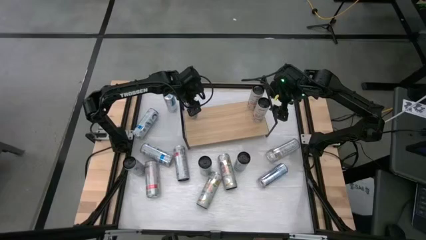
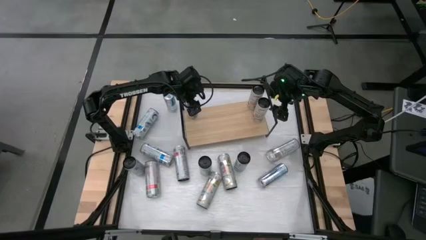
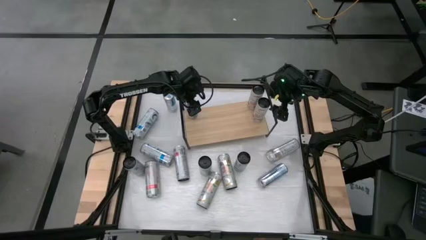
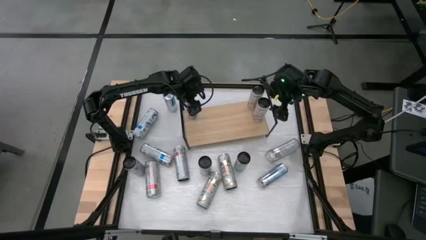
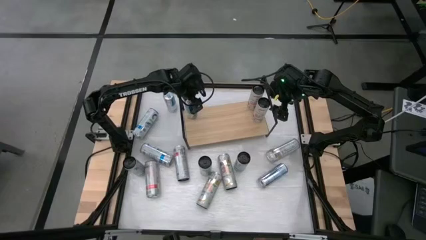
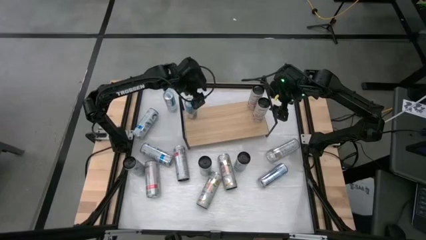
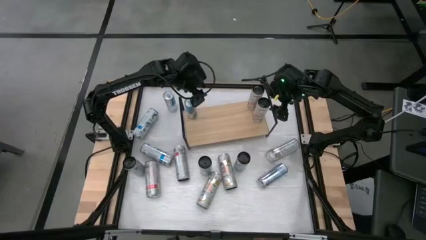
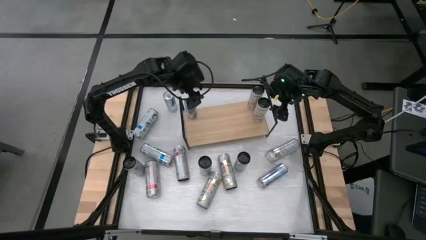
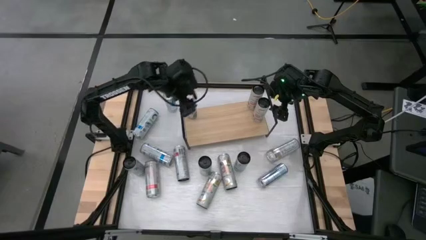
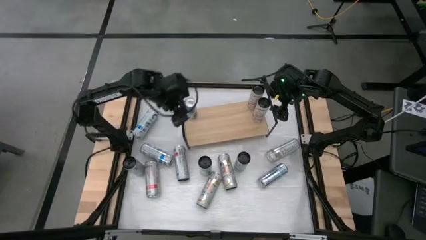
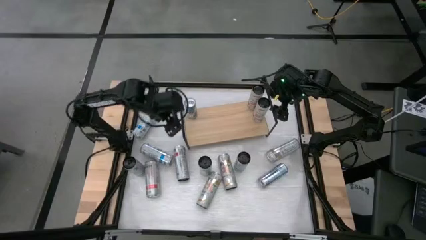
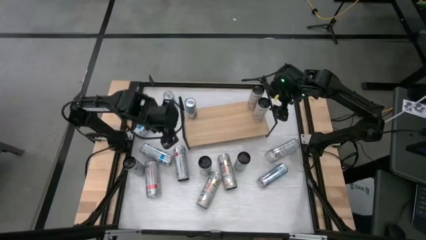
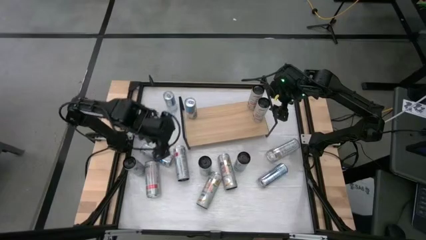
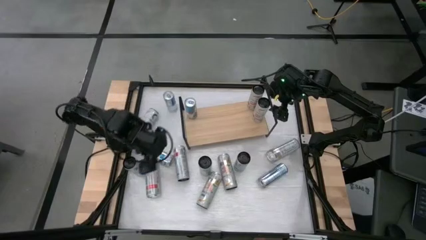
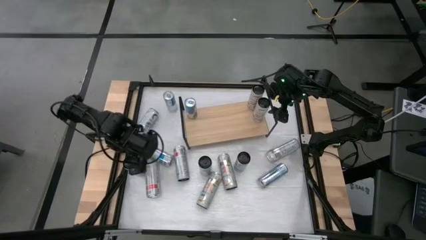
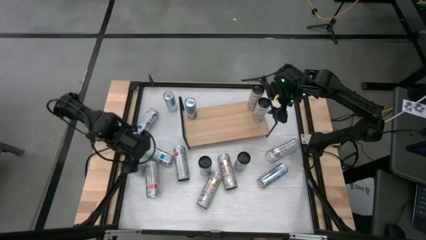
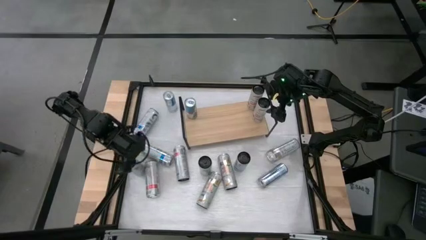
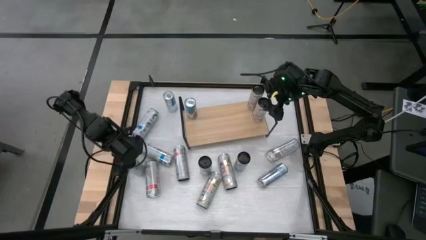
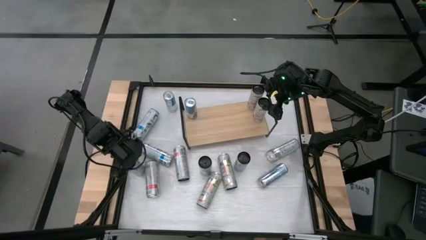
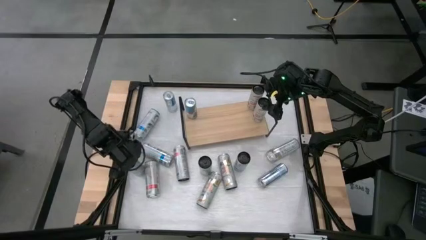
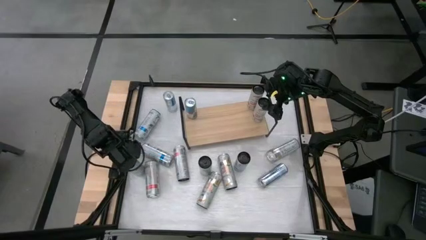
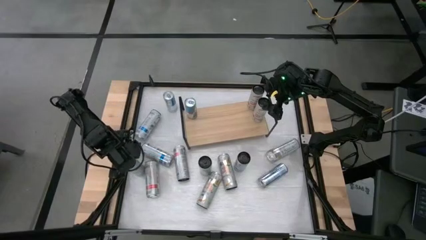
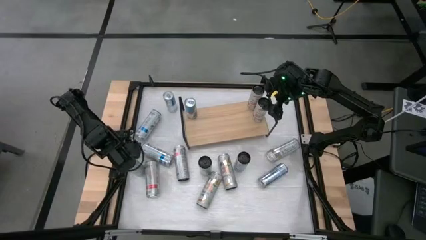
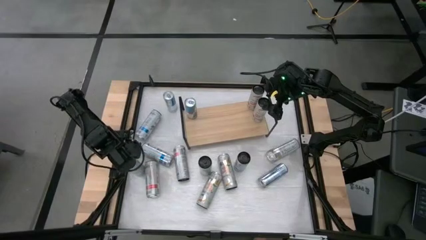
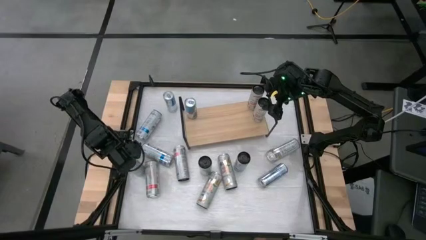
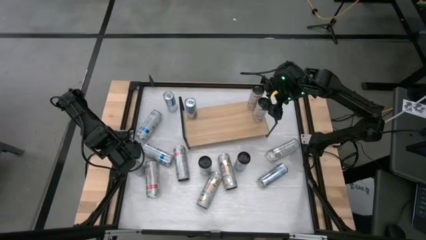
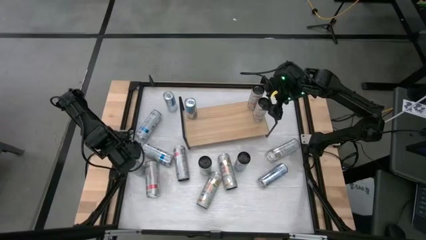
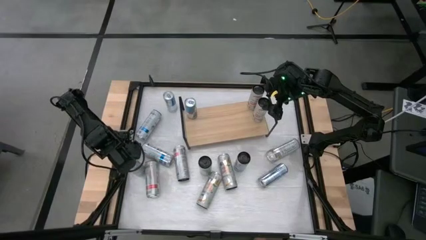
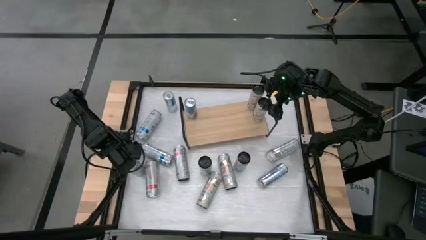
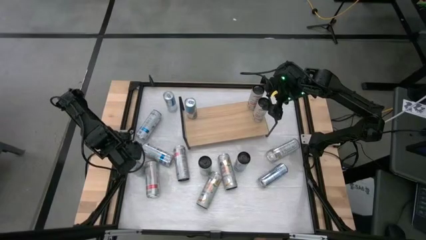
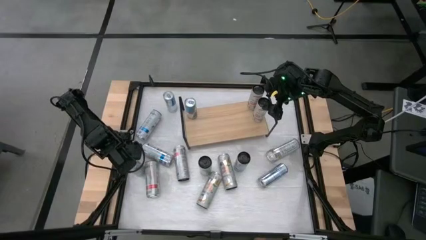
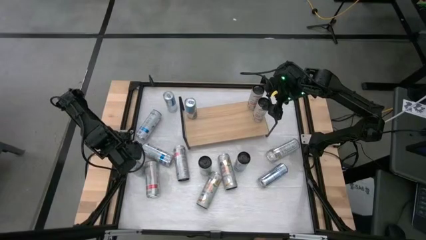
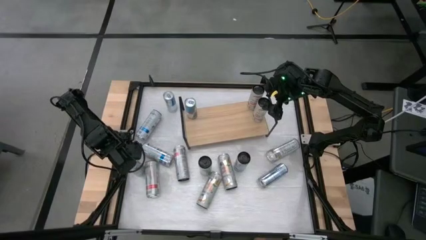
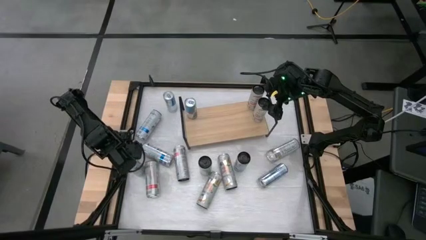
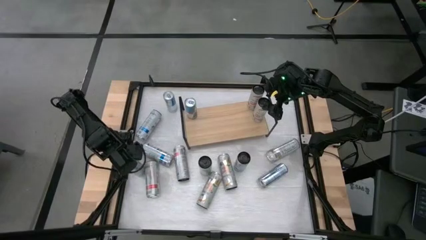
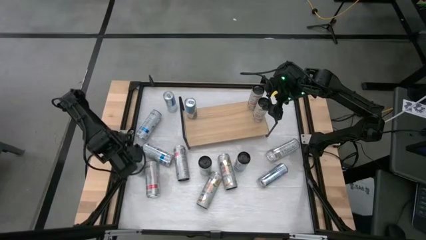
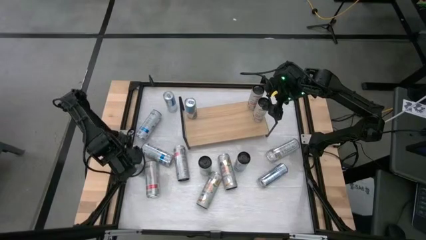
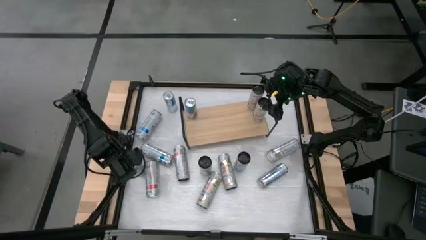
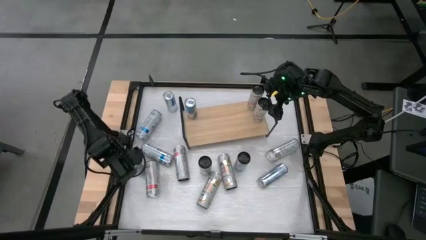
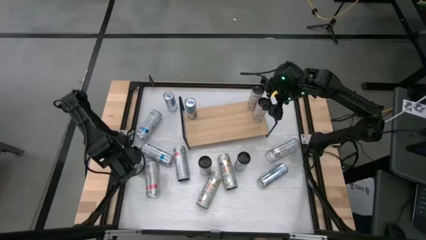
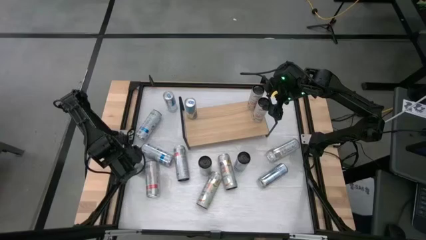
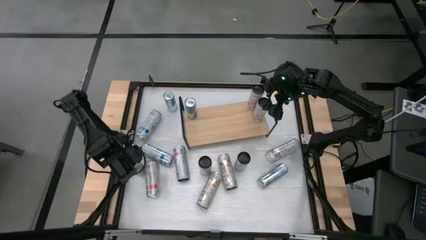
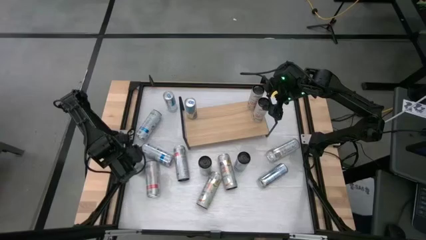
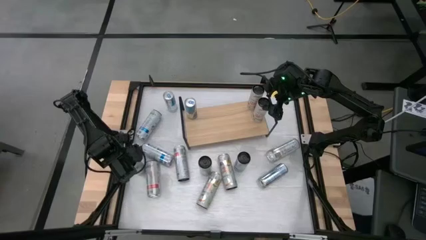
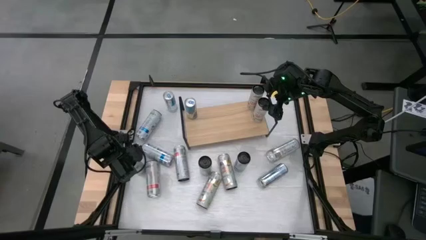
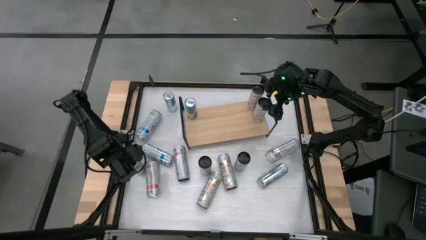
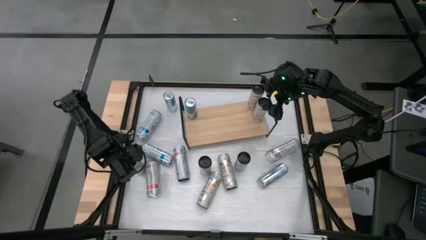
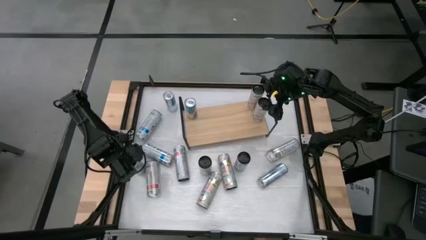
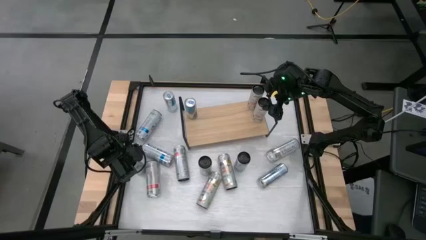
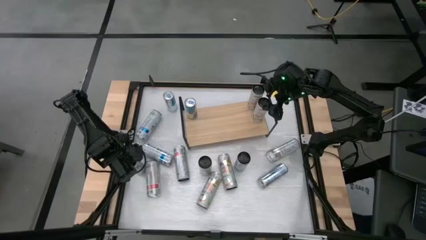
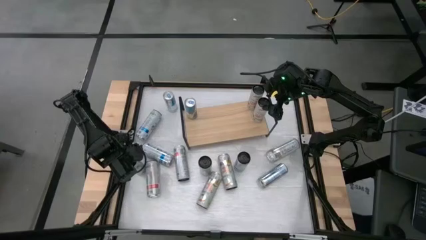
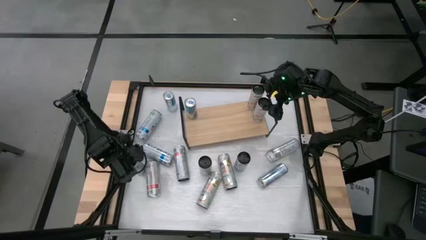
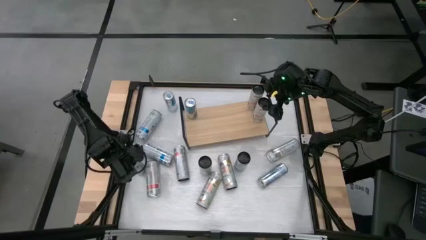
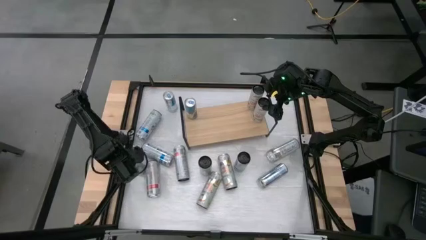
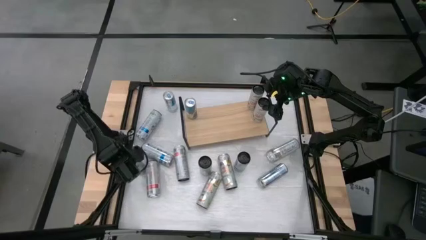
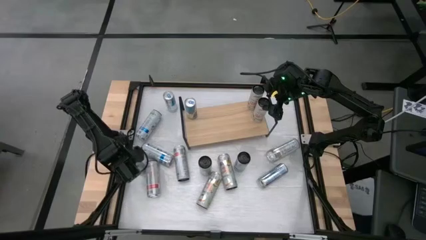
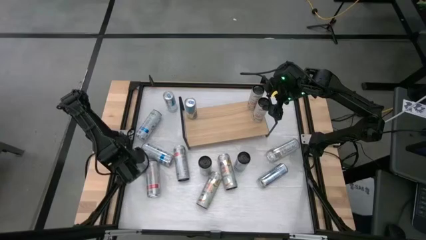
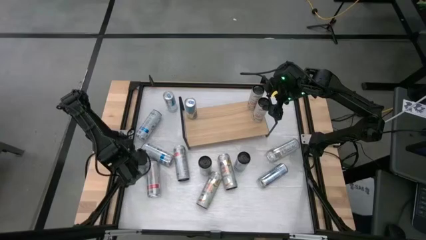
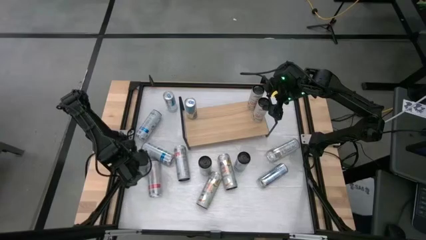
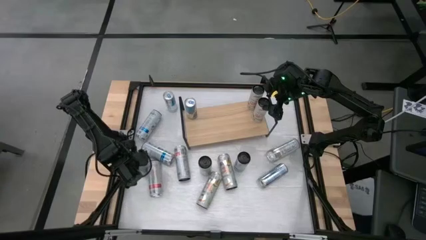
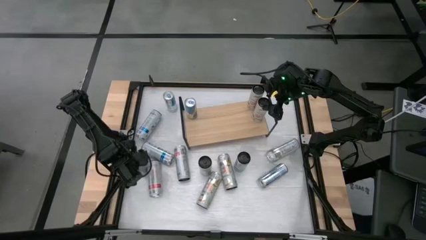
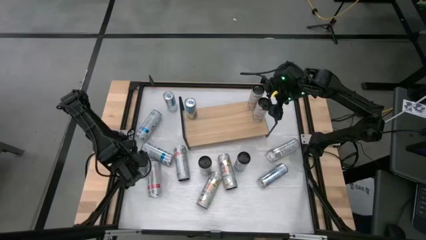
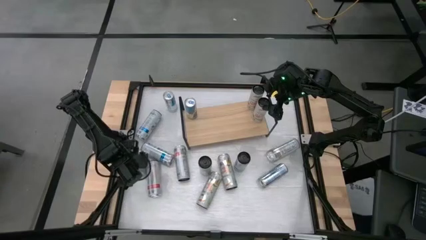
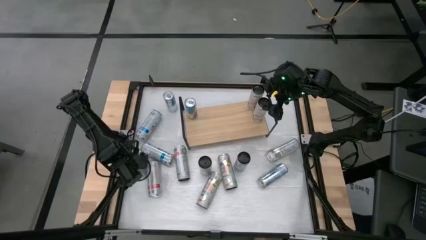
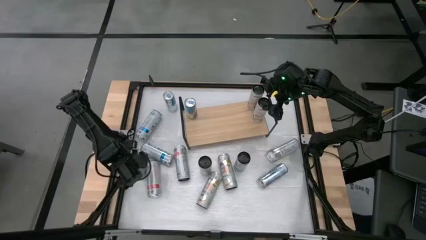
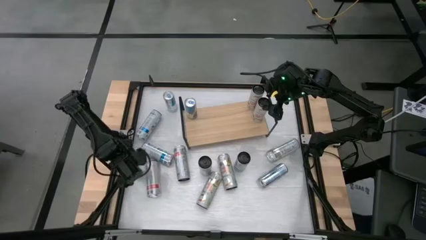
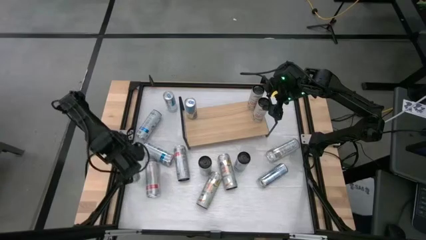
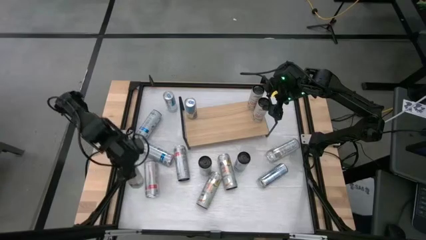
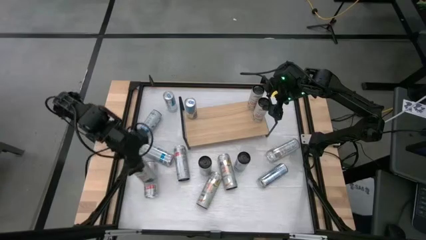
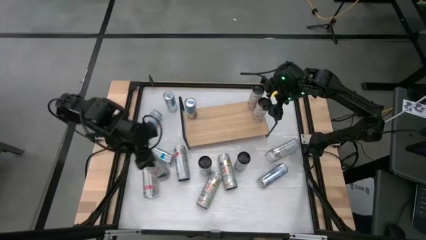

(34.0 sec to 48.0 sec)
Task: Place canned beverage on shelf
Put the white-pink soda can on the shelf

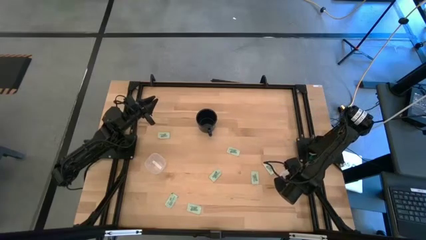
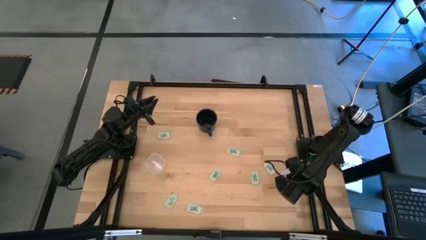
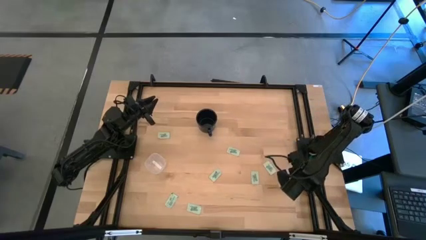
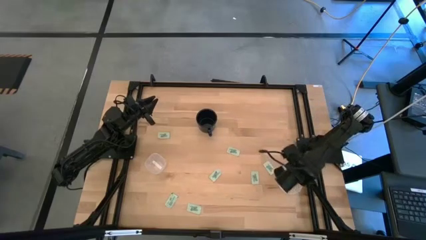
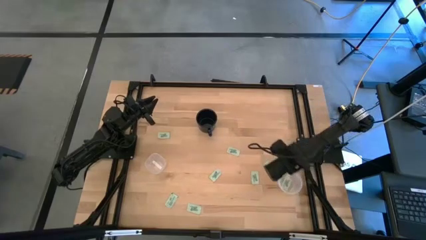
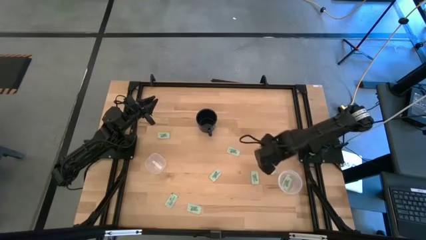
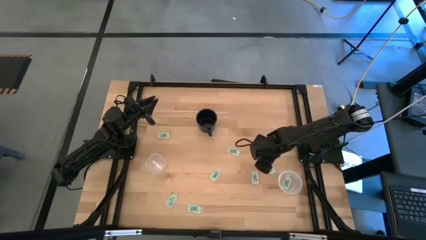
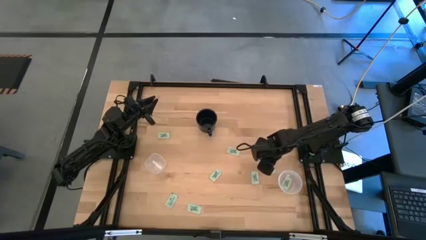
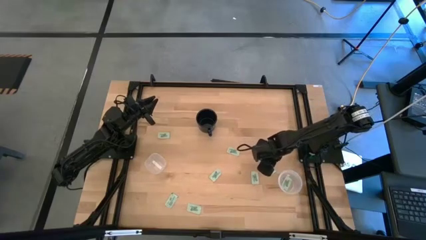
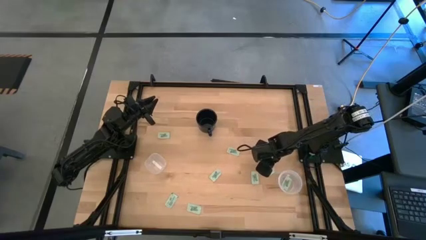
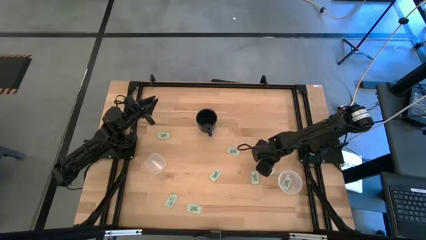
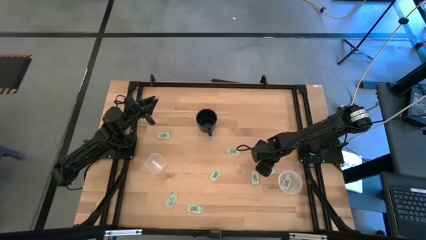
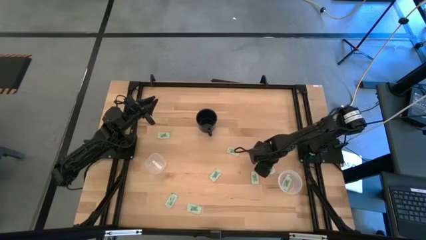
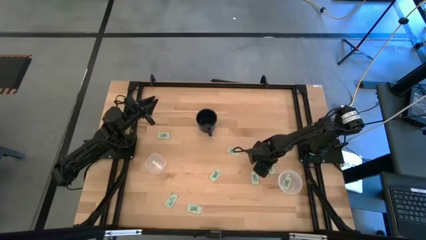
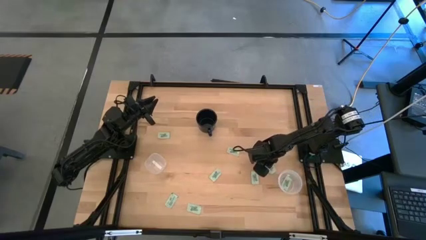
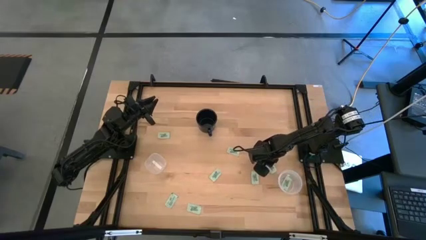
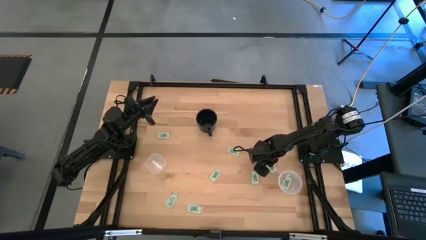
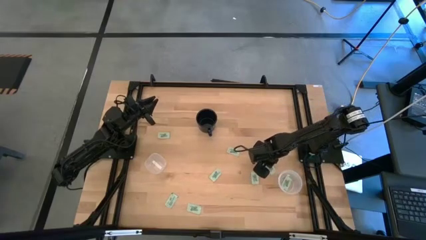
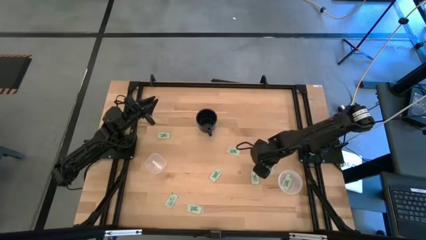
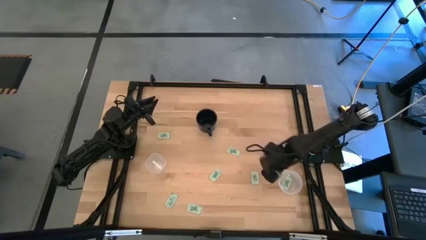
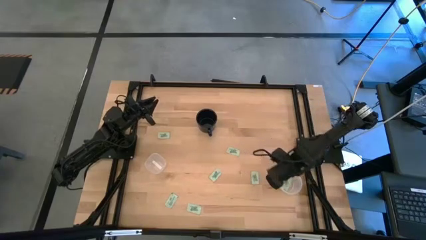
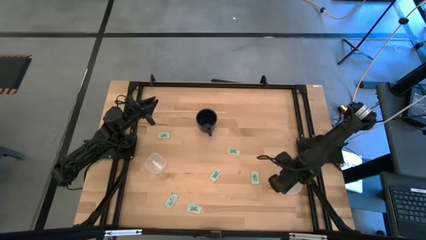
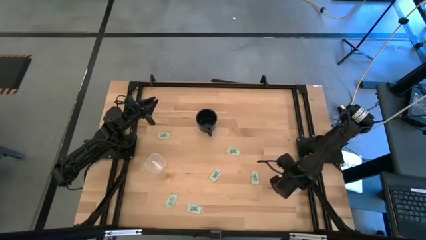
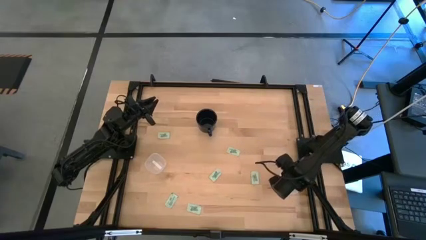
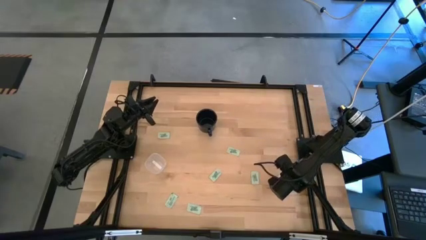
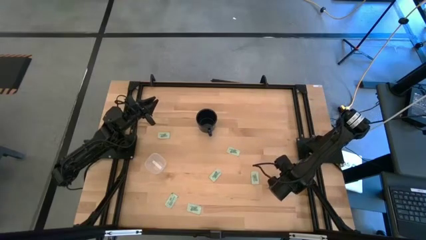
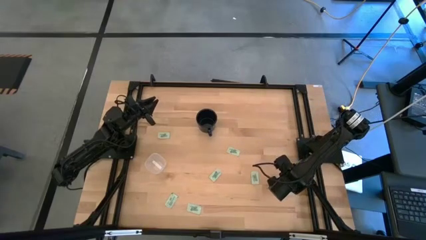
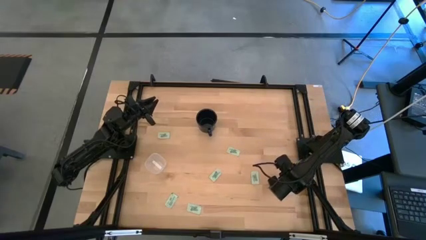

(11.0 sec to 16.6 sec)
Task: Pick and place Stevia / Truvia into bins
Put the stevia packet into the right transparent container
